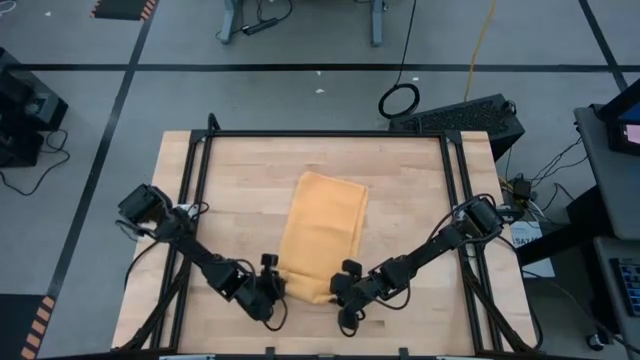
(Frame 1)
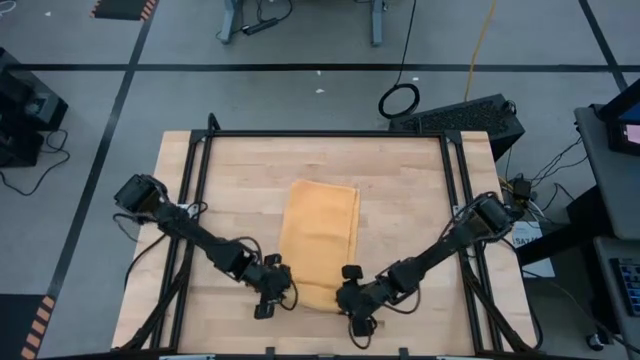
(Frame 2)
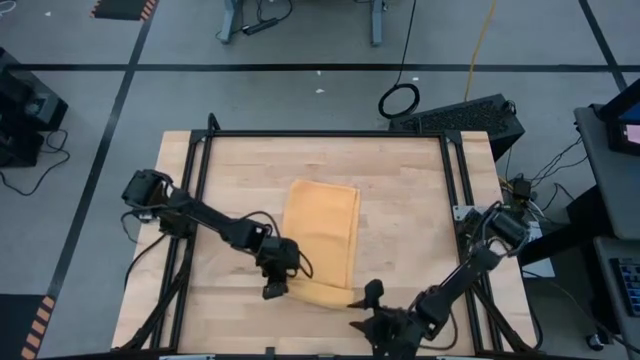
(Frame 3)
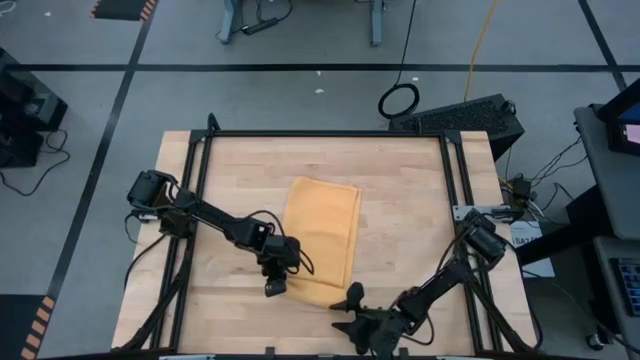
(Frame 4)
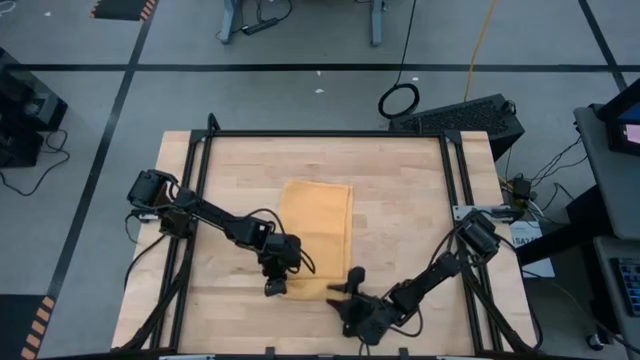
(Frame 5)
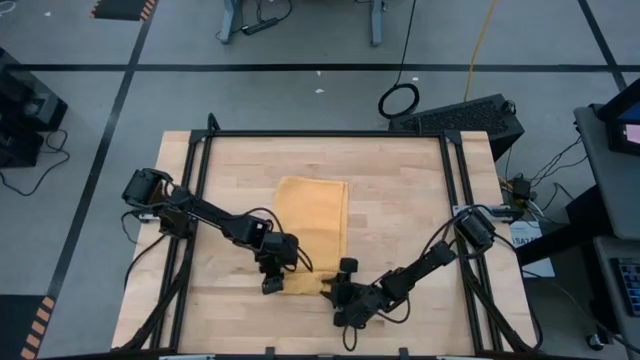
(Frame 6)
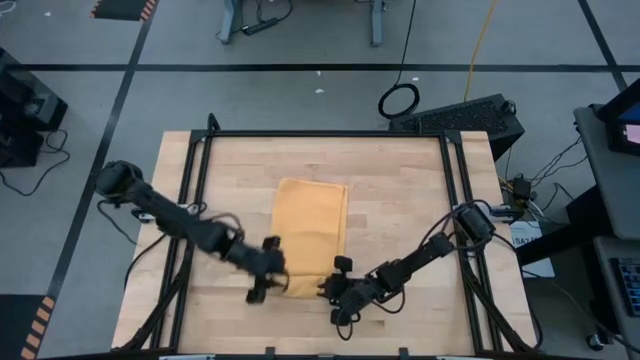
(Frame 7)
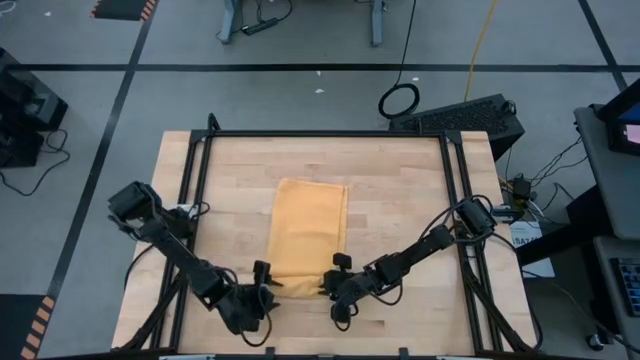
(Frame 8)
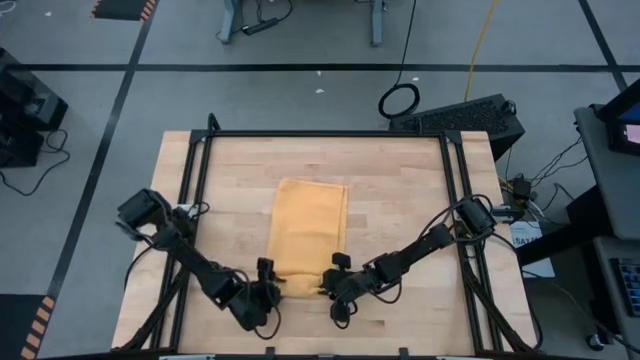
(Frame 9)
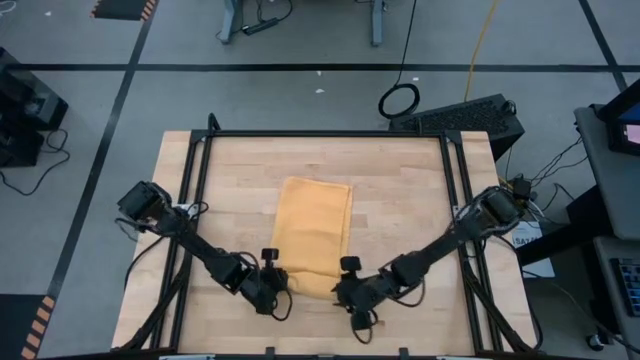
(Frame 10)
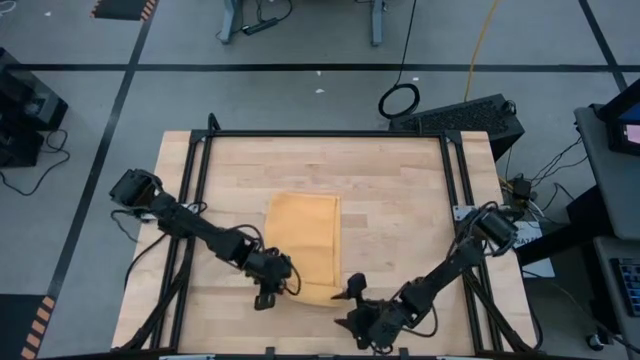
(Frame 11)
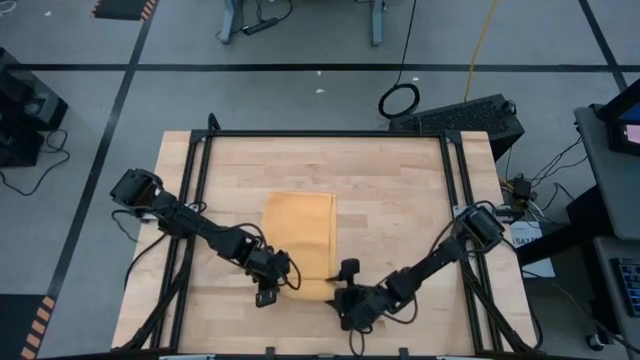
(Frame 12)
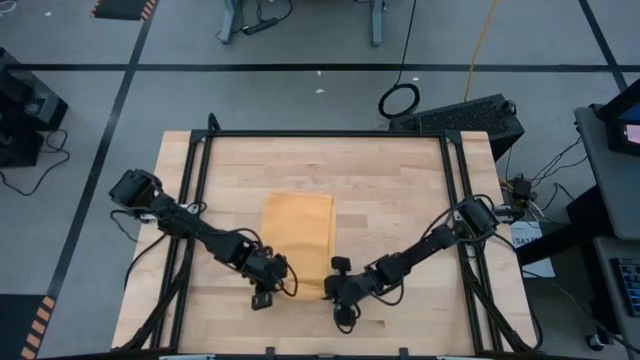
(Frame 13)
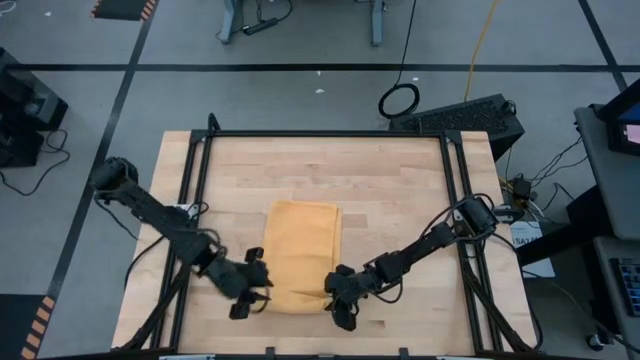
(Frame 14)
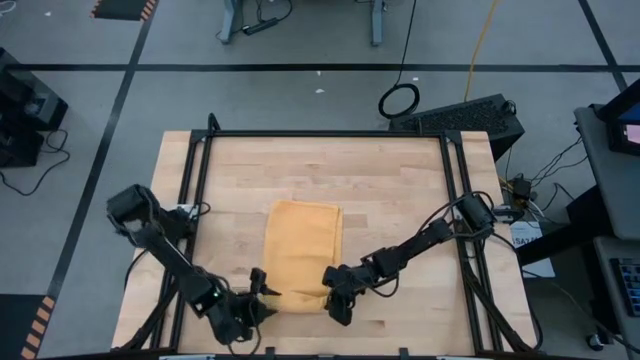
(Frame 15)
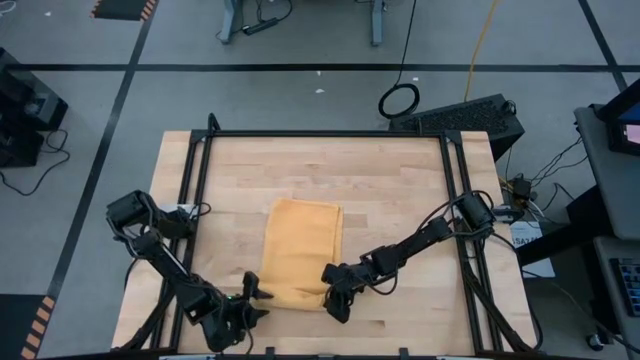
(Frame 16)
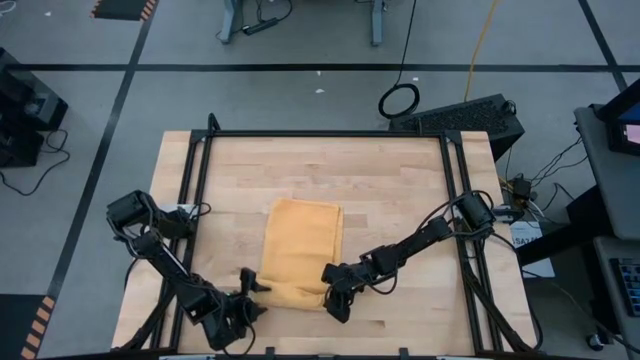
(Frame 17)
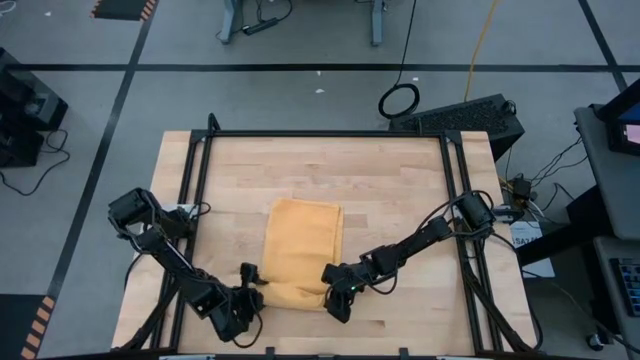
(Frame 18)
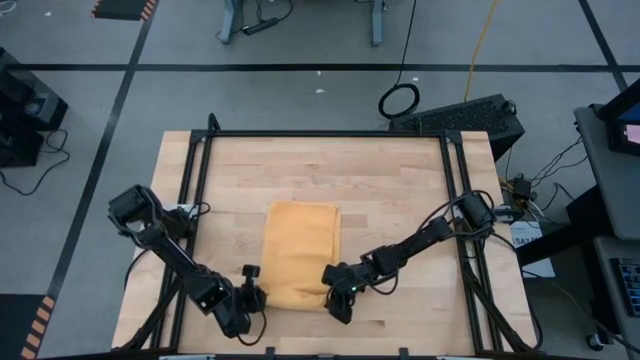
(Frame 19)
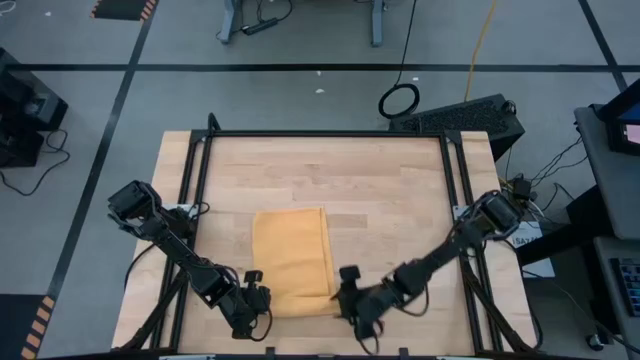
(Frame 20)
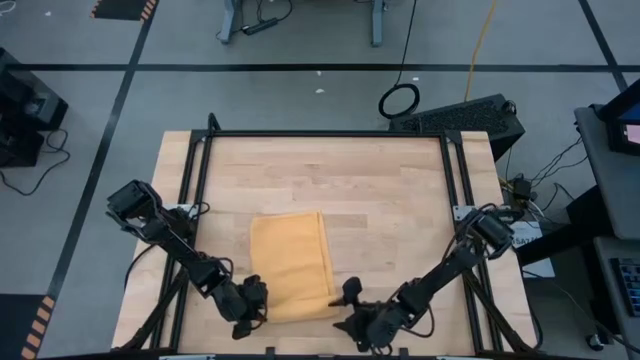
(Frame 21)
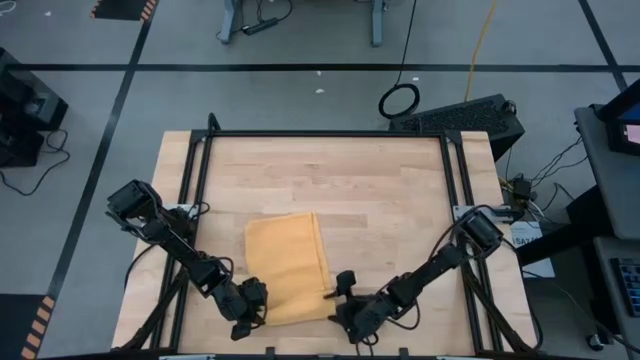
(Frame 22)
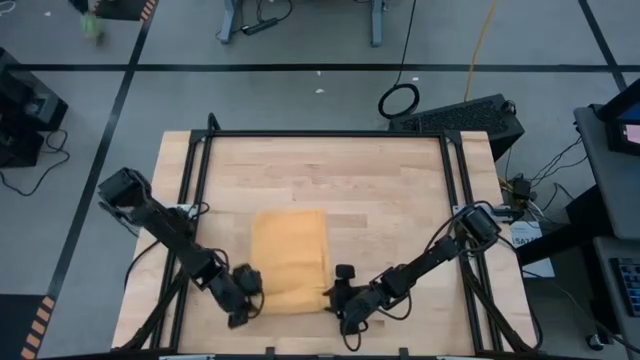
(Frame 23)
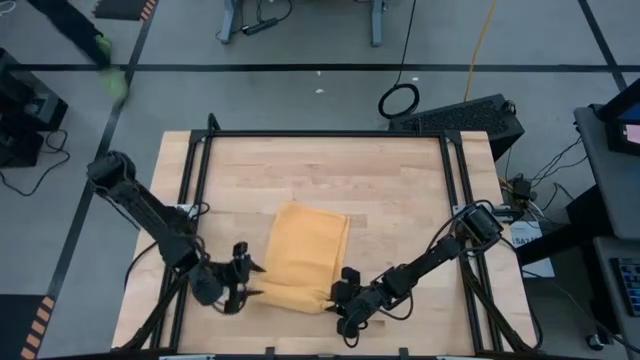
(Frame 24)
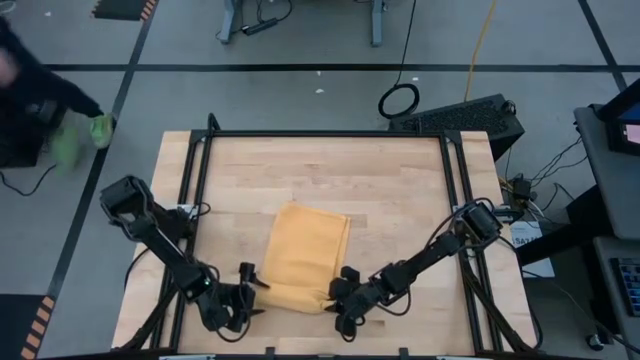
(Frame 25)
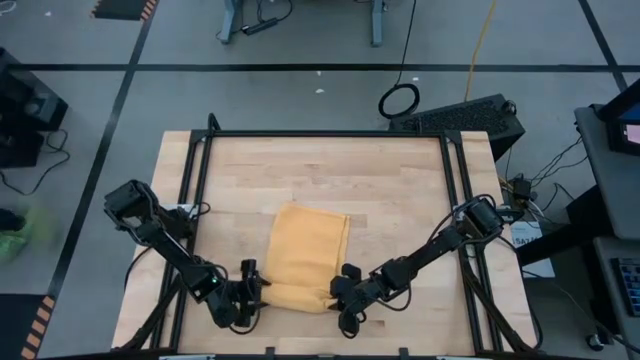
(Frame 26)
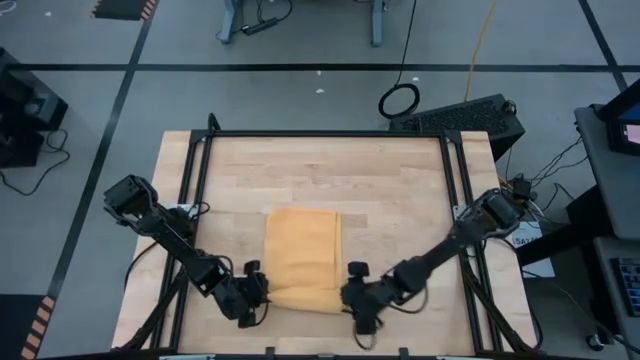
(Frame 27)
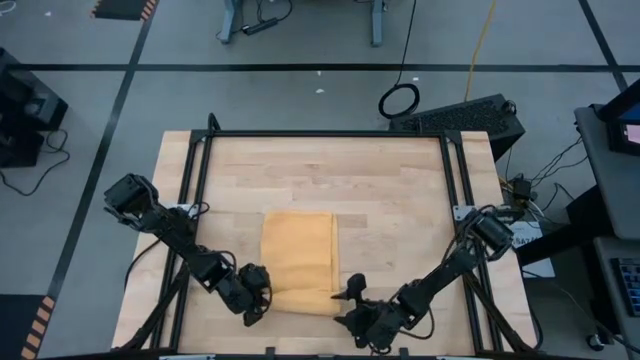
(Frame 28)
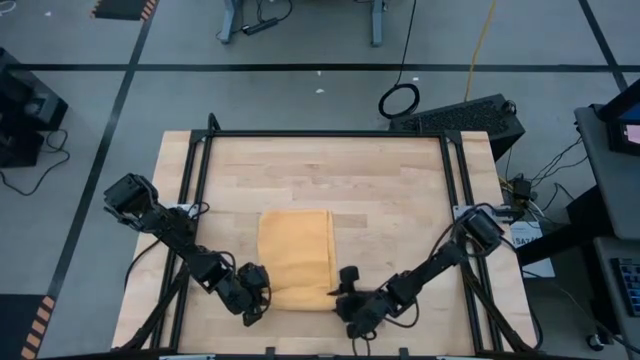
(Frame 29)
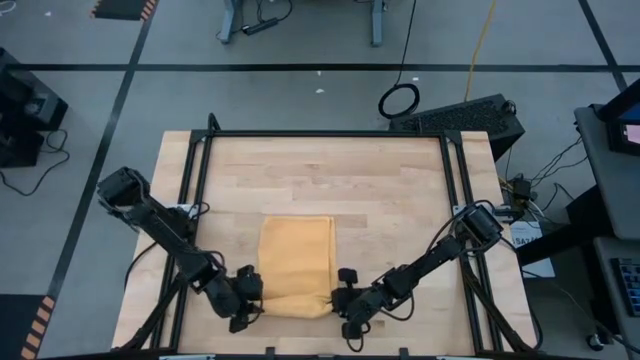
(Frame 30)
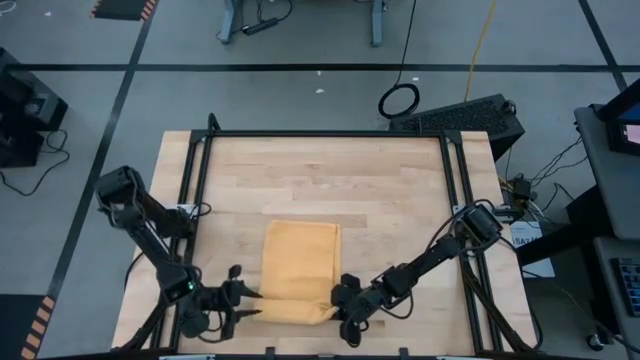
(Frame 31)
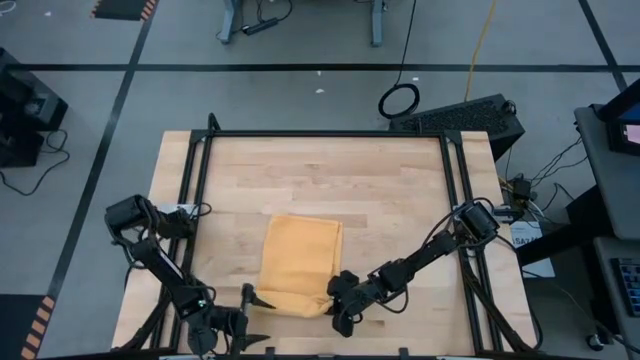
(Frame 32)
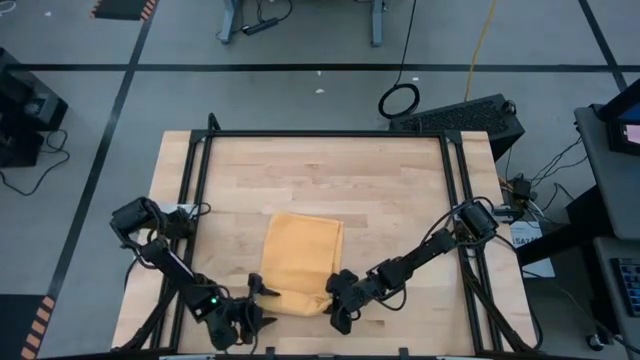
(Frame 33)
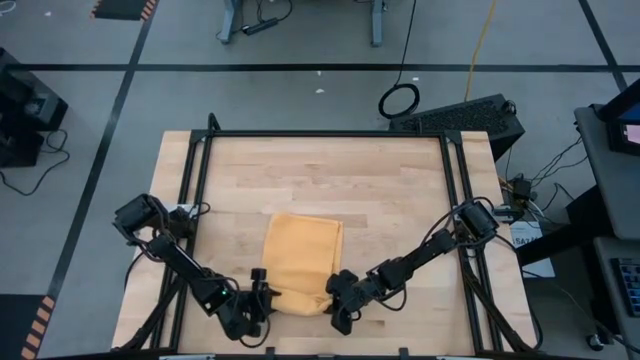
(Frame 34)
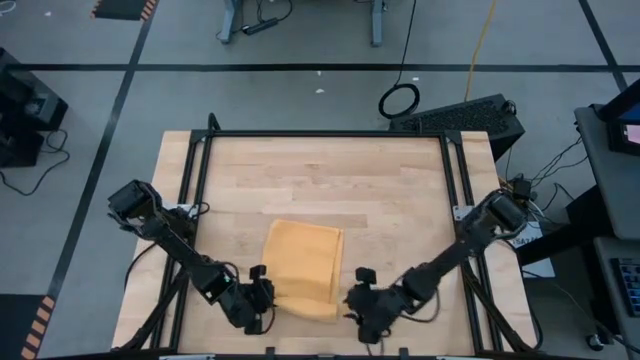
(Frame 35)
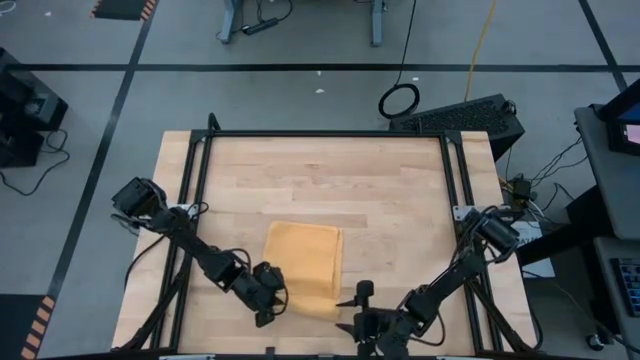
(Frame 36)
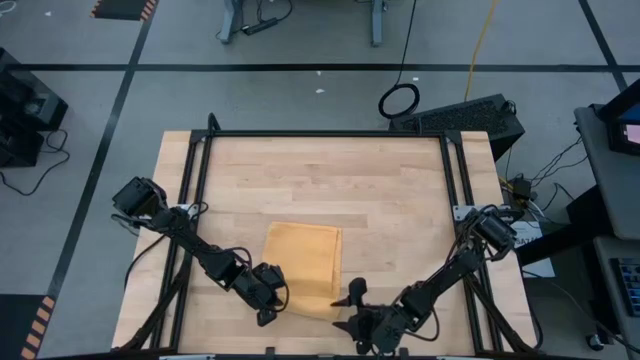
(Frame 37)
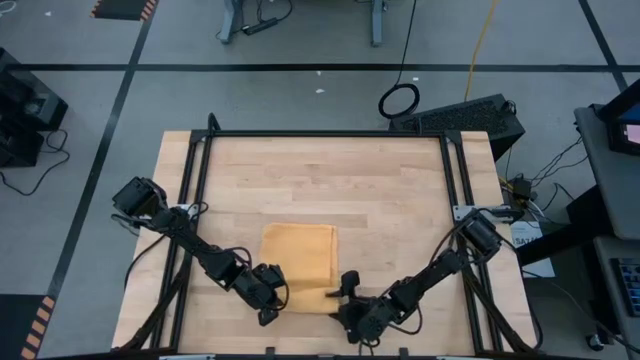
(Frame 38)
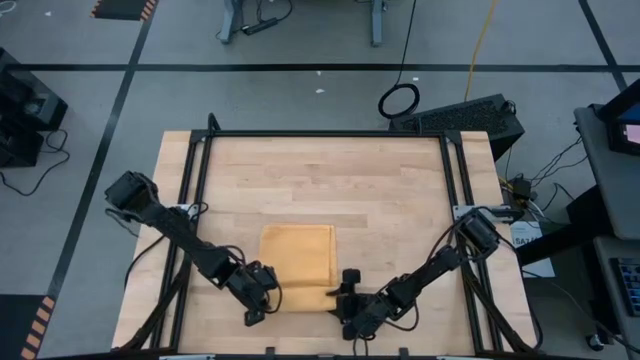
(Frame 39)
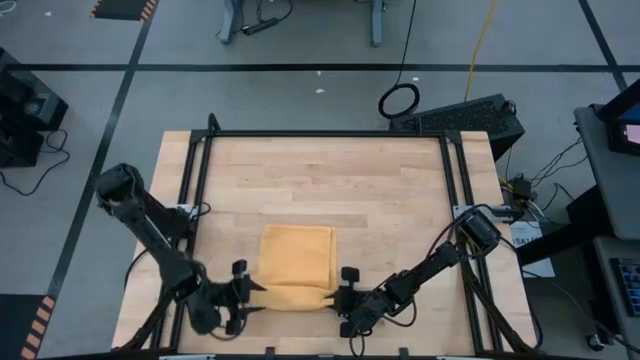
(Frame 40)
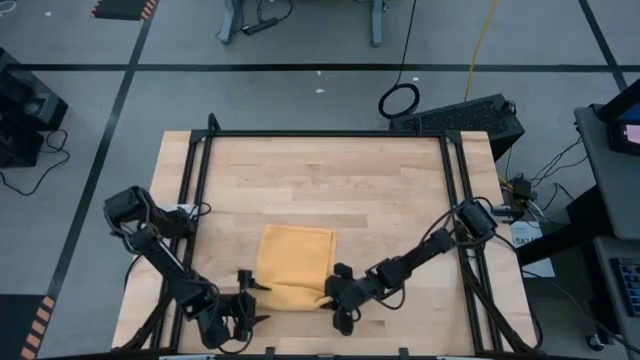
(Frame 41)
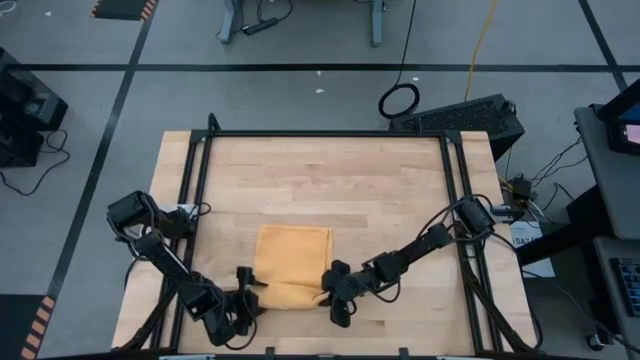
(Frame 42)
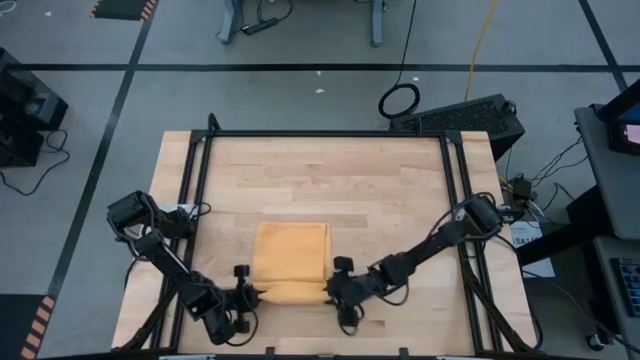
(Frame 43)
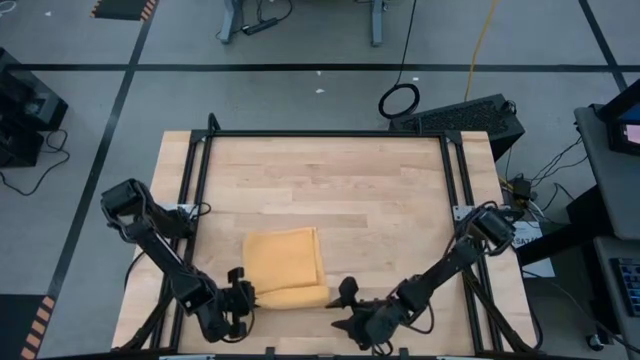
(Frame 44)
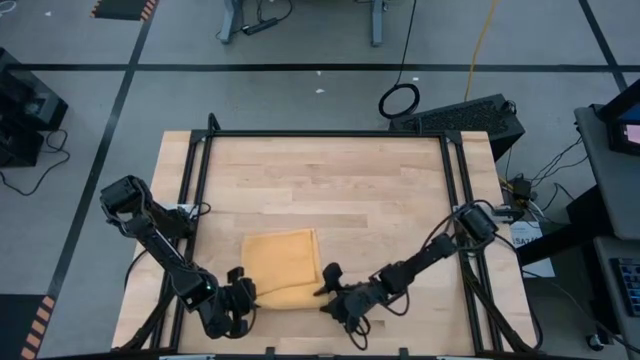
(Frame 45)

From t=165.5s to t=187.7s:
Task: Roll towel
Roll the yellow towel
